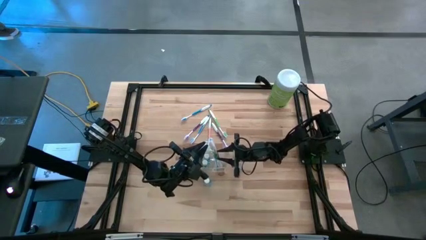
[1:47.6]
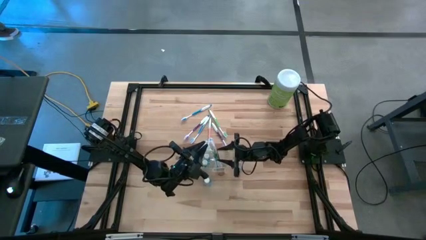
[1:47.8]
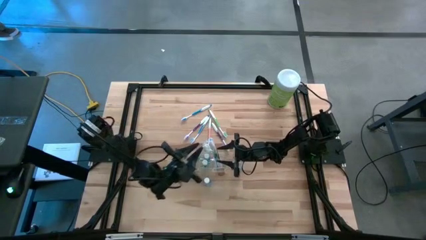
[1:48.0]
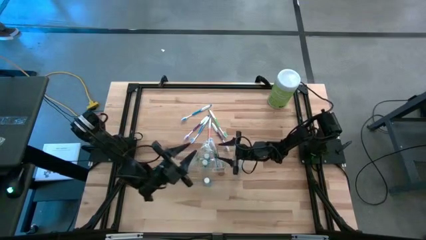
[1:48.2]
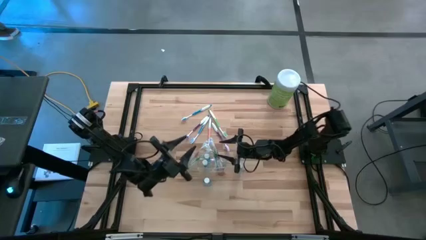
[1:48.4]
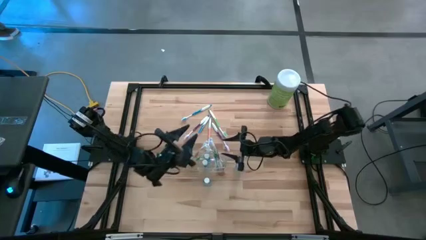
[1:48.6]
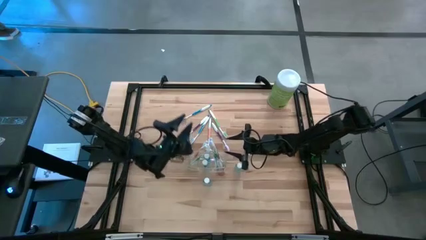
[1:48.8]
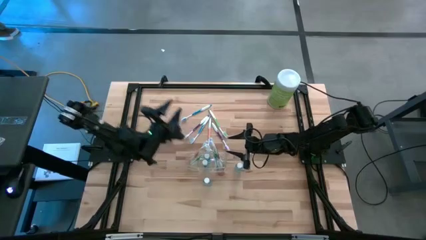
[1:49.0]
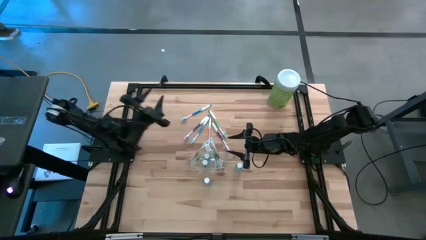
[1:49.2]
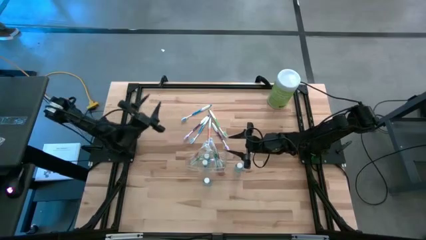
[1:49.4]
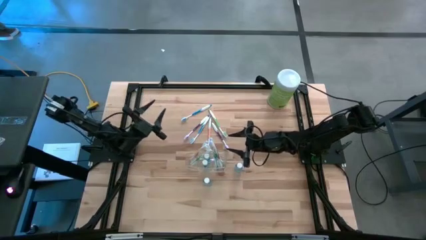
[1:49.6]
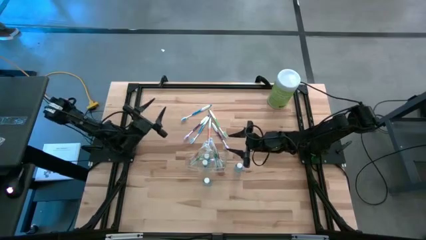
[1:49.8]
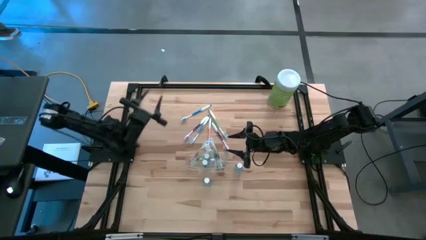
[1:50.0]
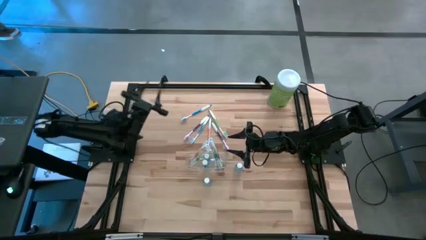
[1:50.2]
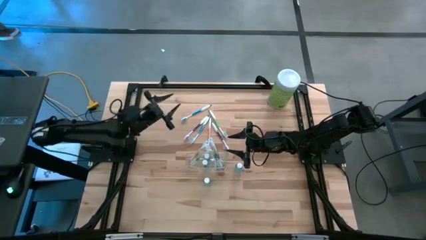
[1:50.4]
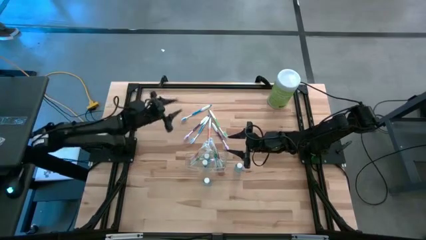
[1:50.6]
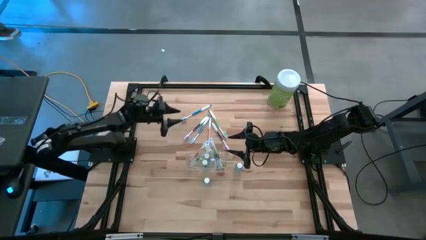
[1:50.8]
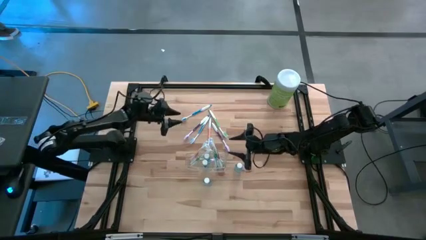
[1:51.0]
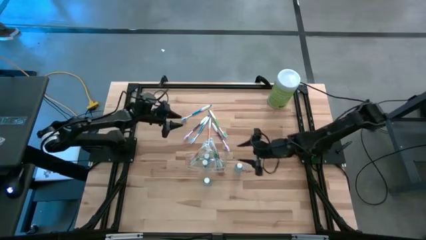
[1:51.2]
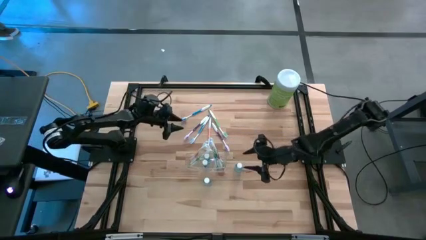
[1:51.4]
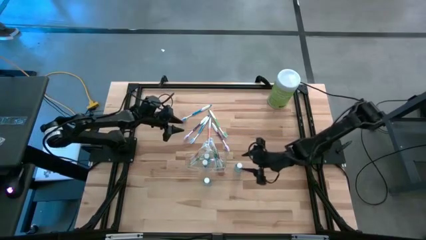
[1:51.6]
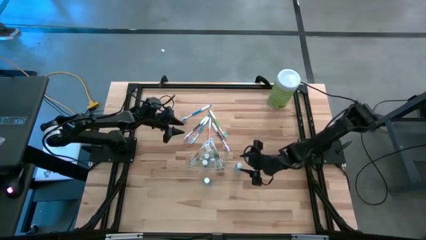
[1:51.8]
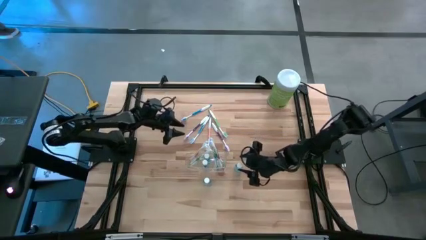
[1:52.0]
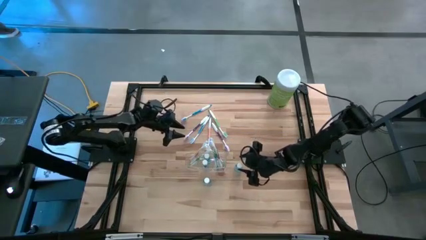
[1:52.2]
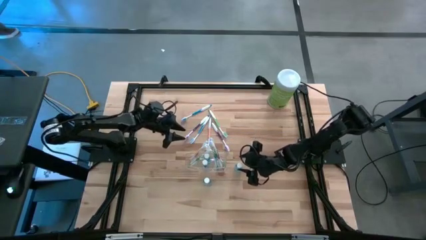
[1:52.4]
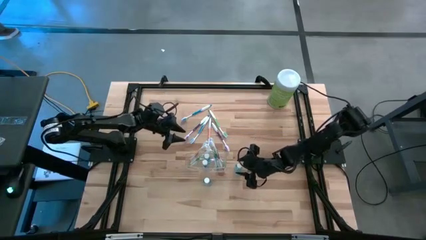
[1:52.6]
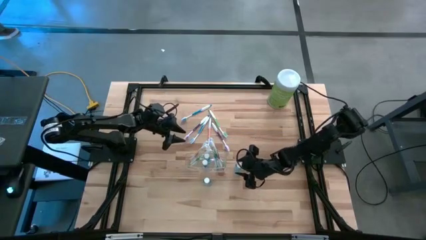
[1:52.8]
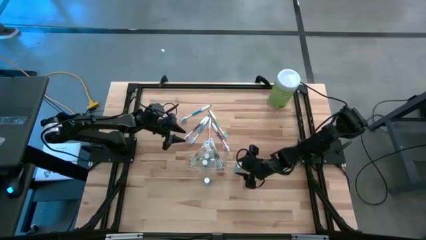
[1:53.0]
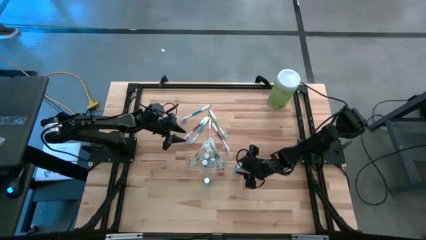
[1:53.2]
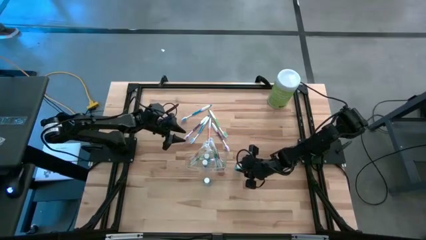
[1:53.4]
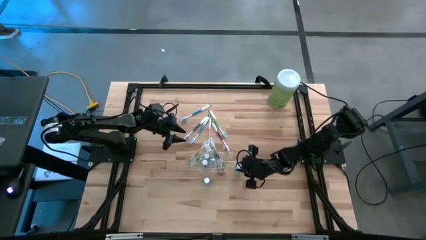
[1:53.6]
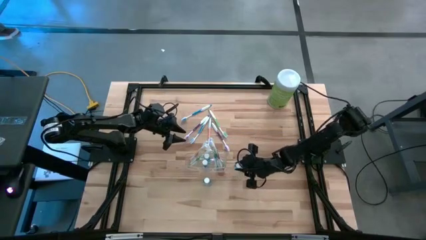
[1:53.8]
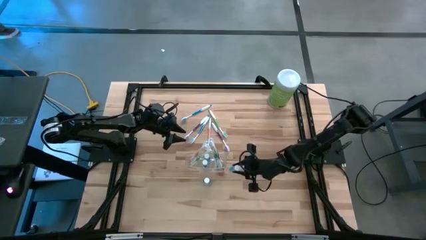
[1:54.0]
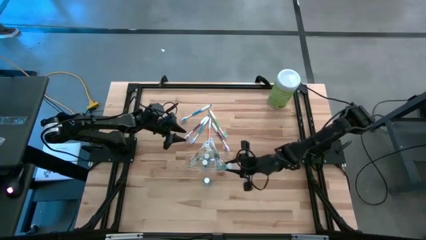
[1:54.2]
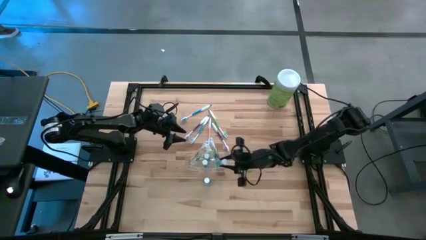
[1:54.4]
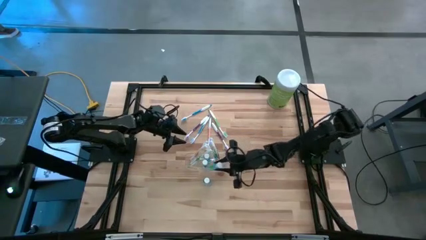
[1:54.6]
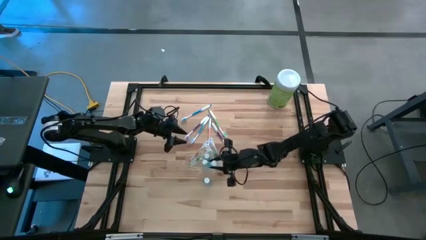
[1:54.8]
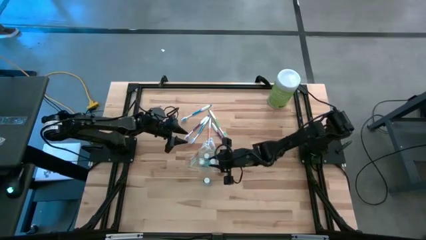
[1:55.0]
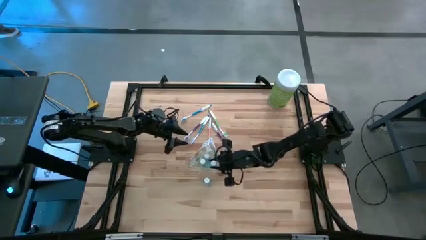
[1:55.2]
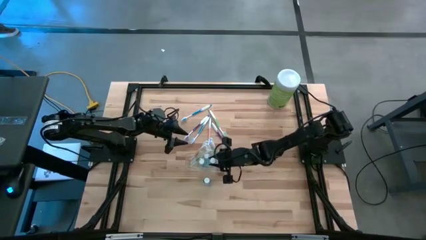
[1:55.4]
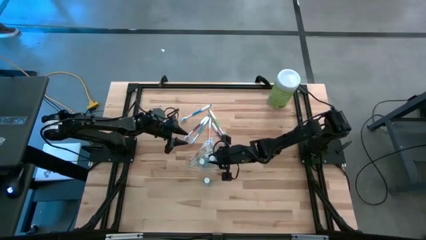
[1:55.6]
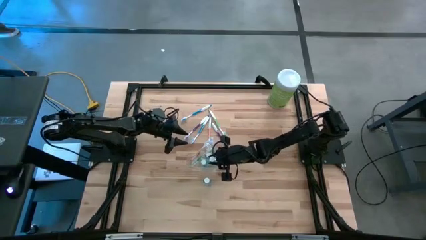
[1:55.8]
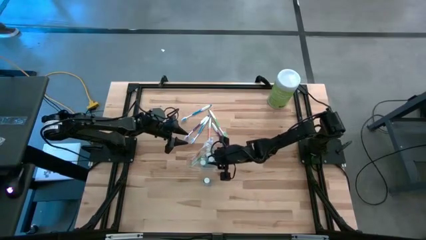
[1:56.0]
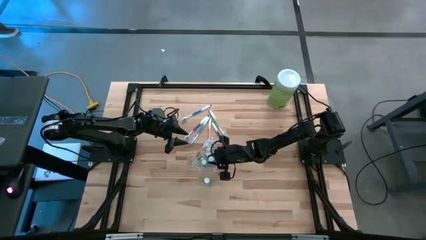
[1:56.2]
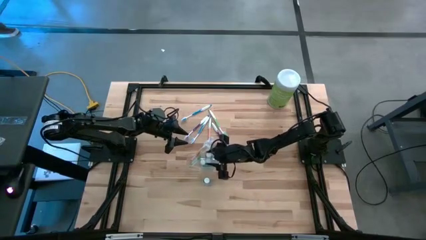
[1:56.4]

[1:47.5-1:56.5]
Task: Pick & Place toothbrushing station
Put the blue mouthwash into the transparent organizer

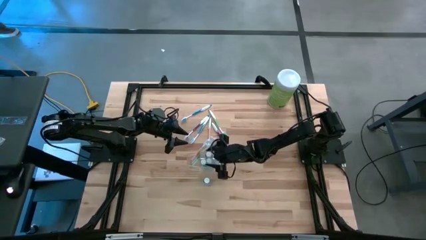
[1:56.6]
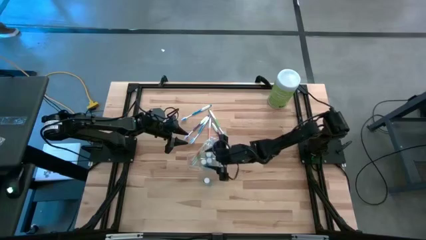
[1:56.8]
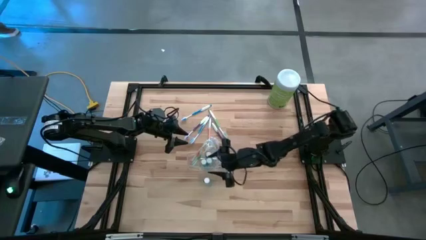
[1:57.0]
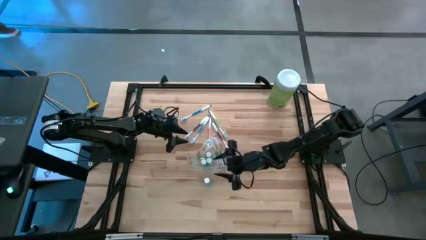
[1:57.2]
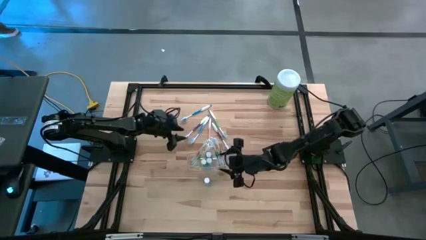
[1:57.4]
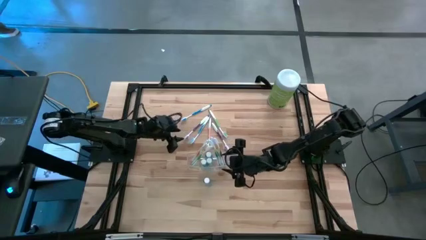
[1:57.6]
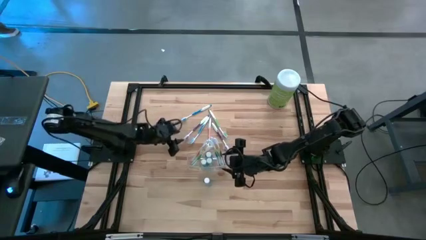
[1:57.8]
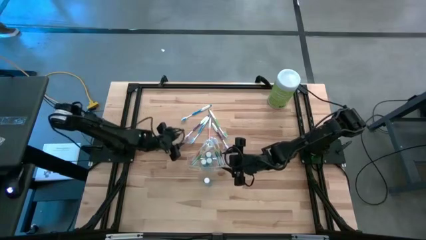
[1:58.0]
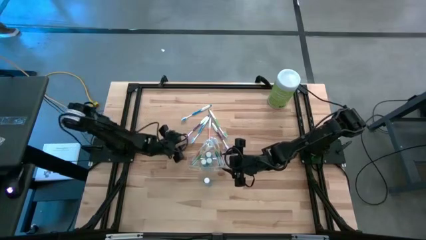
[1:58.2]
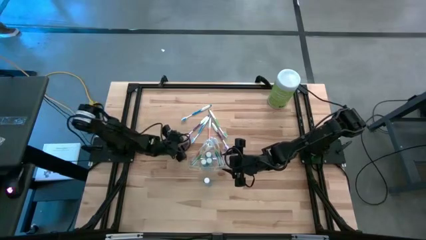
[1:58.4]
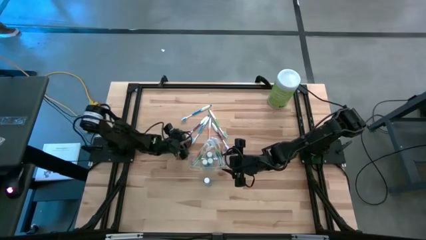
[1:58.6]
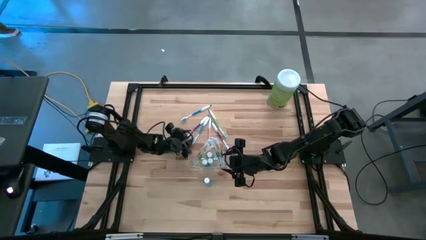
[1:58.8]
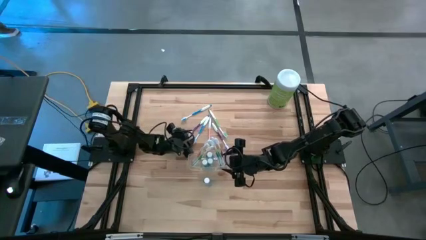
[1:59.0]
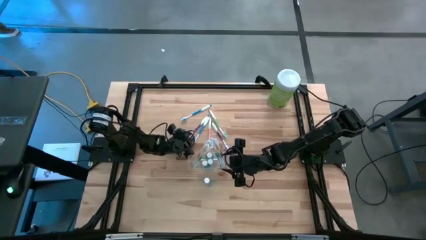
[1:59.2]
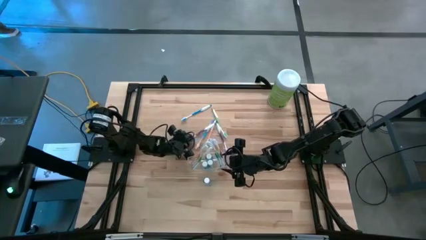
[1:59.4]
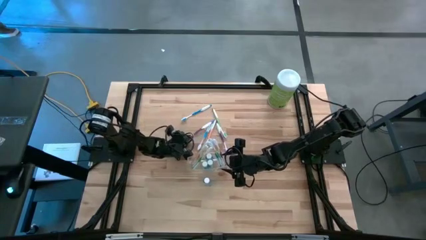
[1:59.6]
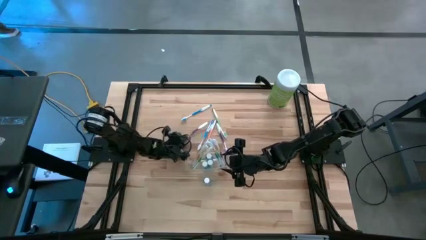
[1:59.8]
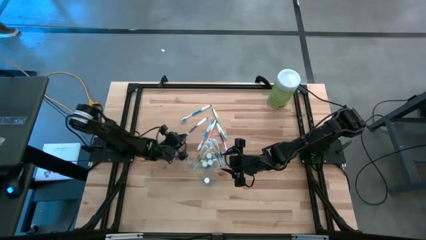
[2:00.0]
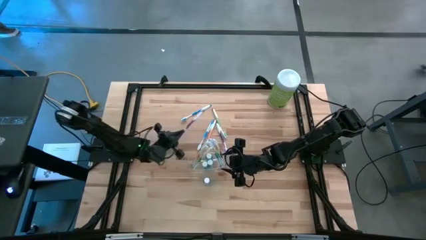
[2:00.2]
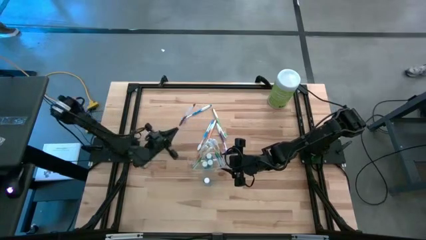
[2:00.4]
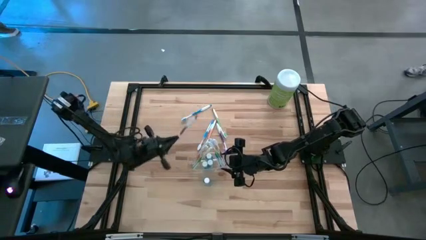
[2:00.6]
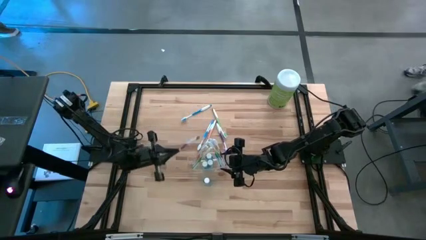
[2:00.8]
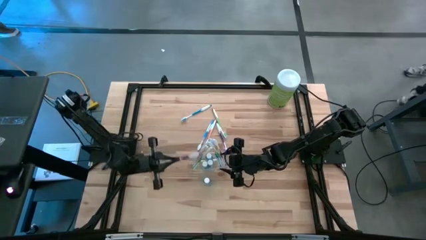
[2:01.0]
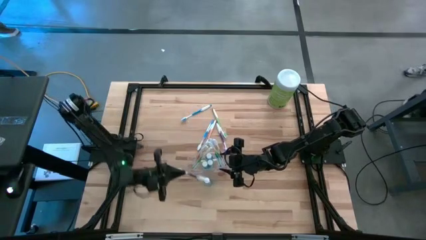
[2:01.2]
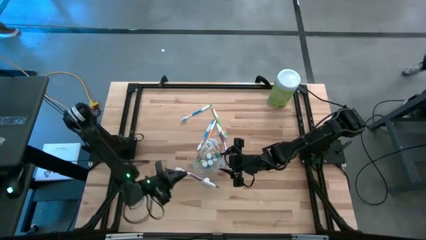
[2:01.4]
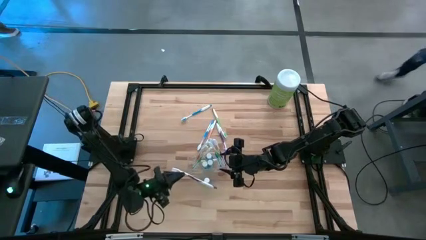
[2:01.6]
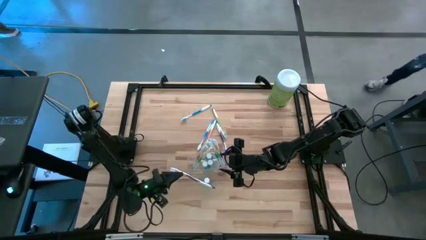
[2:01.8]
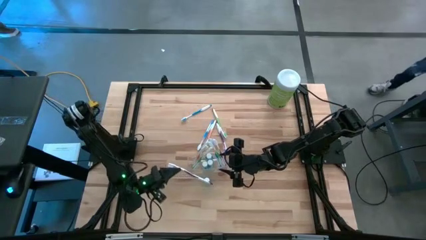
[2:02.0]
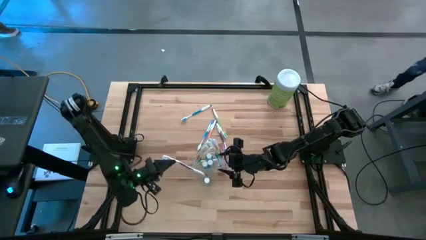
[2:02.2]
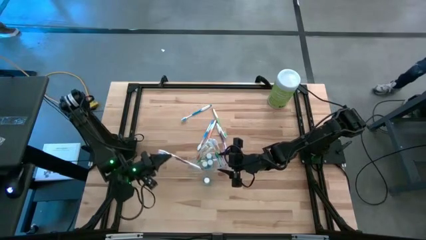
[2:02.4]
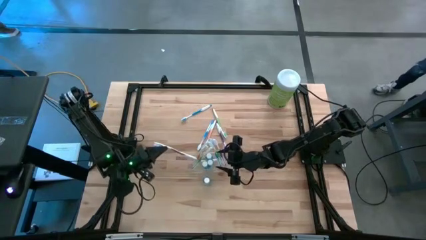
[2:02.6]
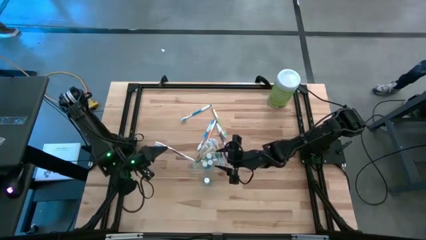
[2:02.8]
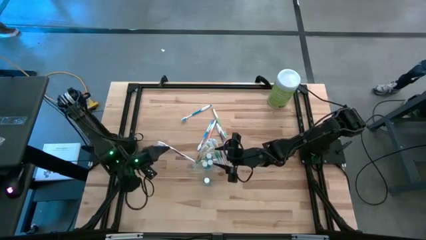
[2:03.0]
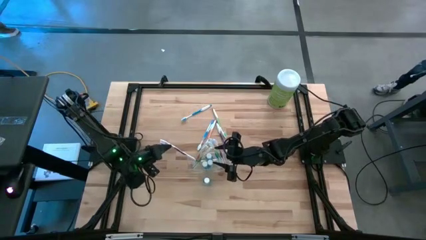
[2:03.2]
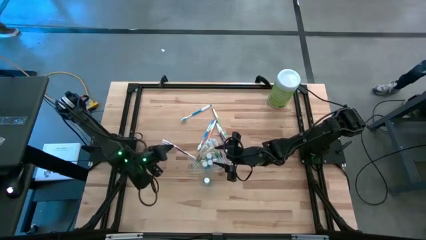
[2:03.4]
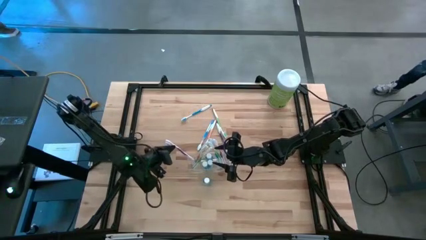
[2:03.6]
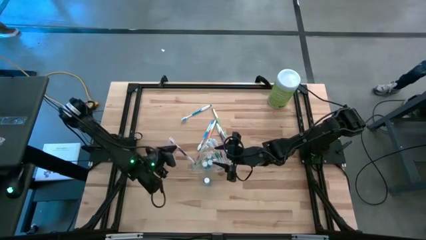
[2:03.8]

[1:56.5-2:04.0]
Put the violet toothbrush into the transparent organizer

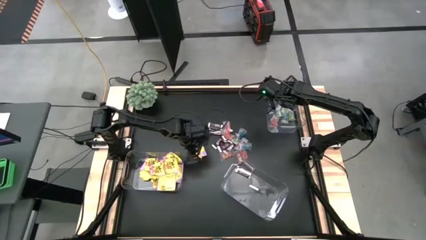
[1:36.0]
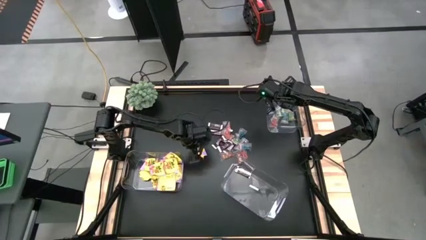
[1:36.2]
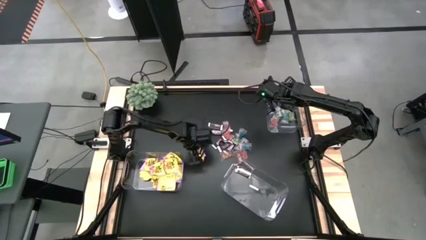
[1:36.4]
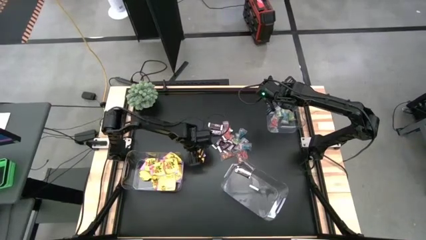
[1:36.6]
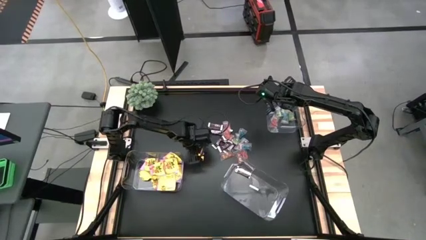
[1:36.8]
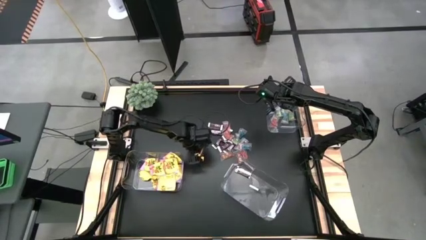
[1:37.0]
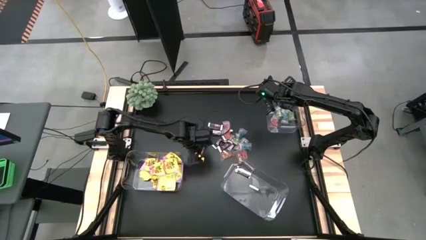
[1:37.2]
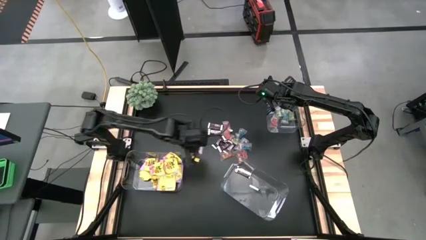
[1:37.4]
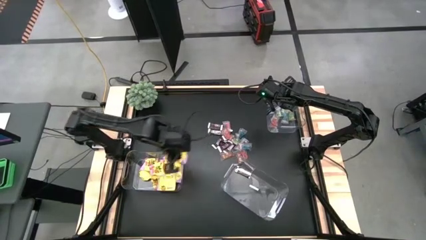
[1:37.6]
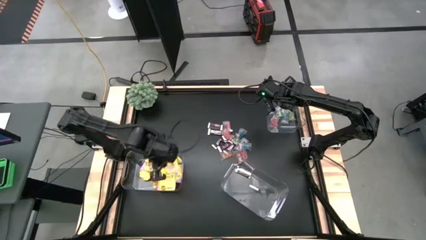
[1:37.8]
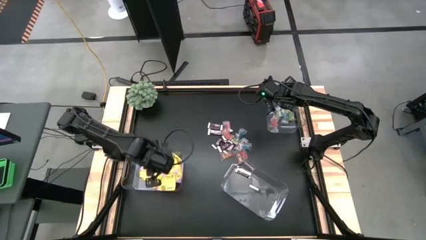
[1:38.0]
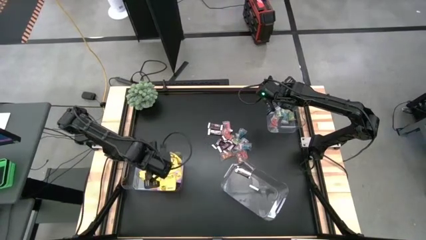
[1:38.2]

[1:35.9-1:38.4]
Task: Sort candy
Put the yellow candy in the bottom left transparent container
